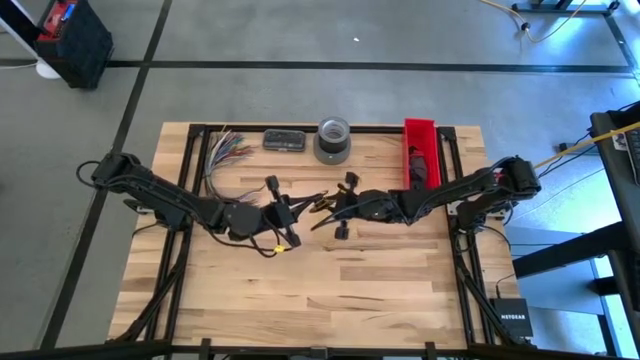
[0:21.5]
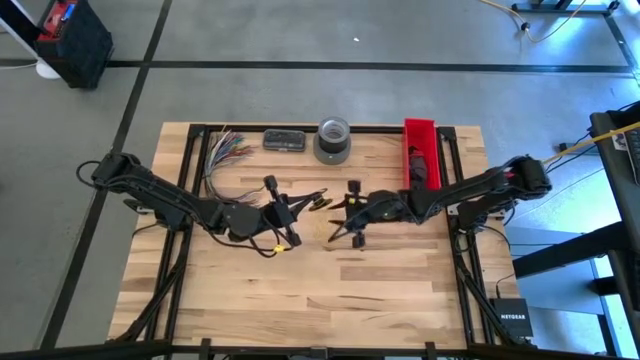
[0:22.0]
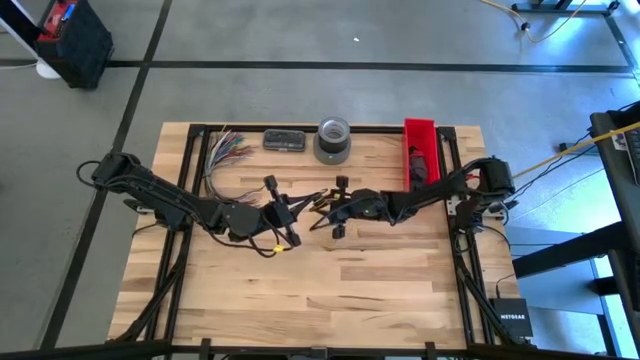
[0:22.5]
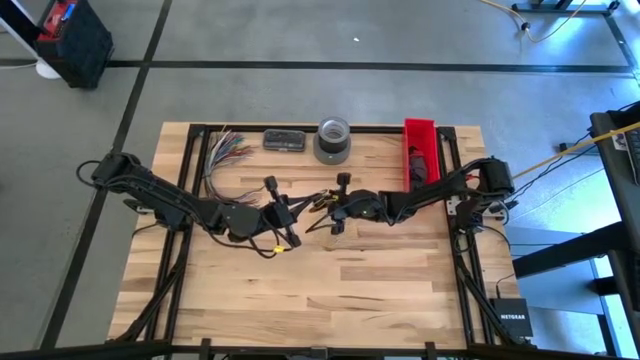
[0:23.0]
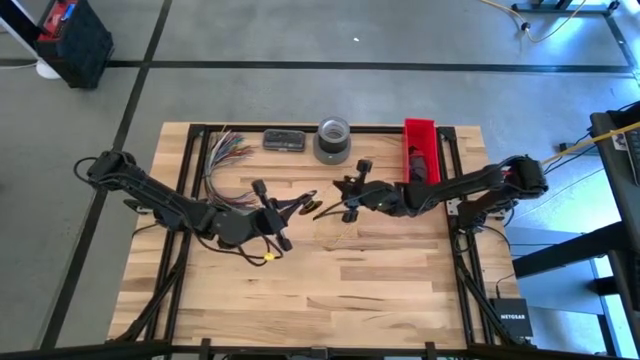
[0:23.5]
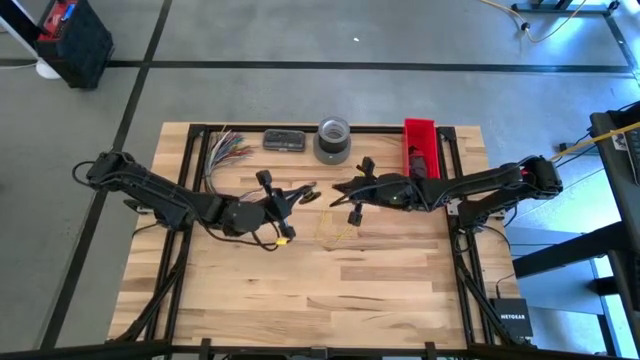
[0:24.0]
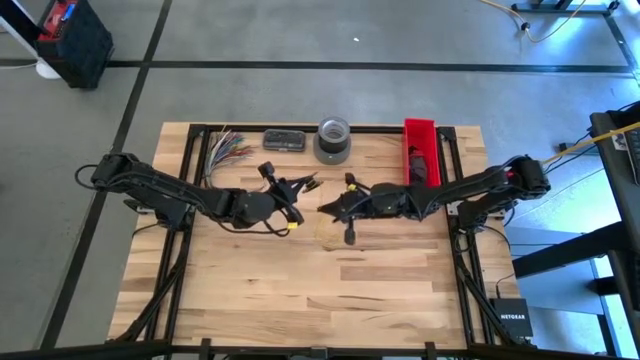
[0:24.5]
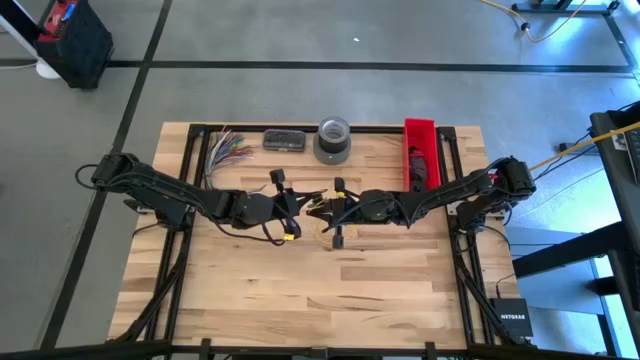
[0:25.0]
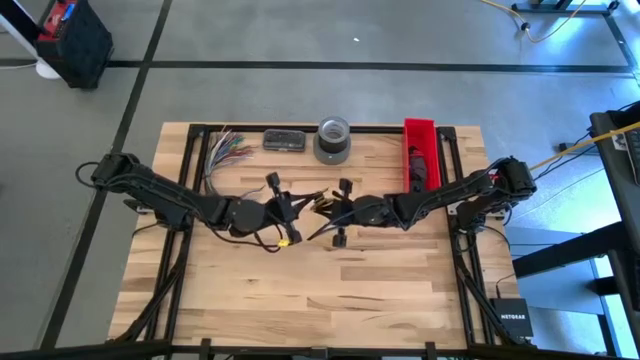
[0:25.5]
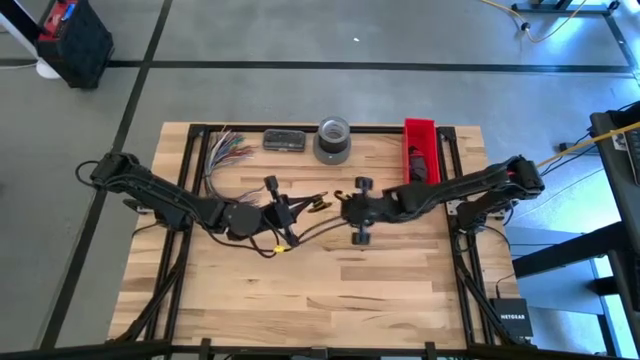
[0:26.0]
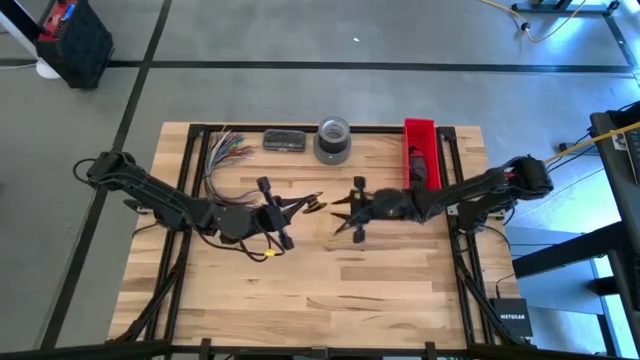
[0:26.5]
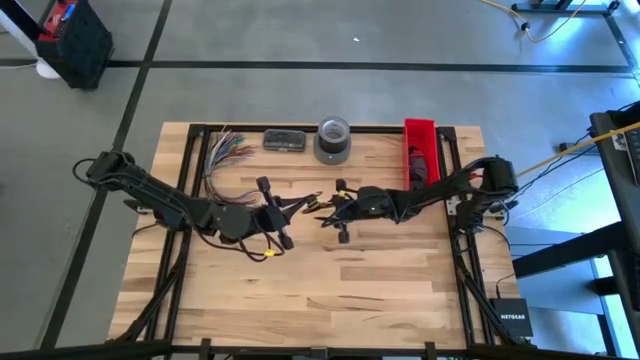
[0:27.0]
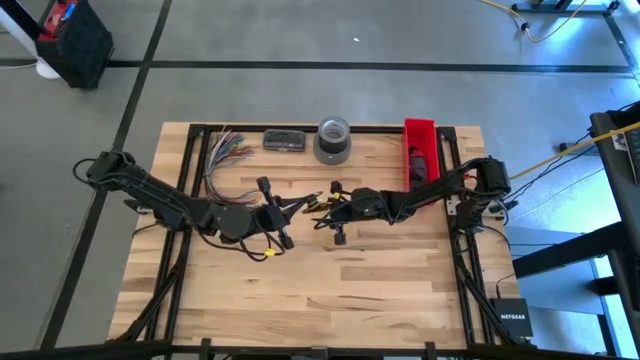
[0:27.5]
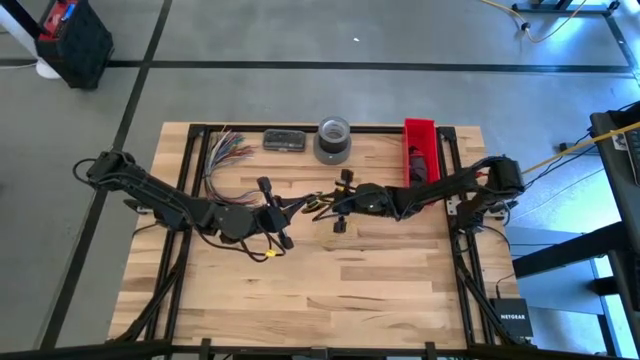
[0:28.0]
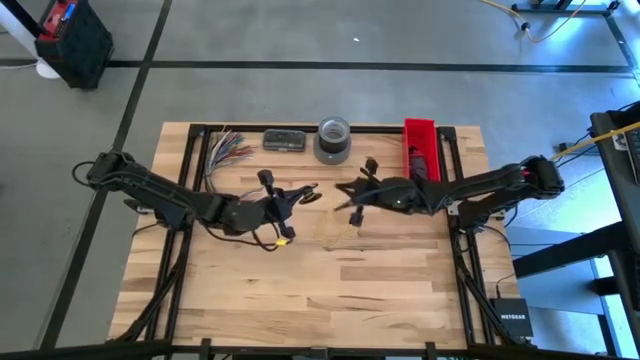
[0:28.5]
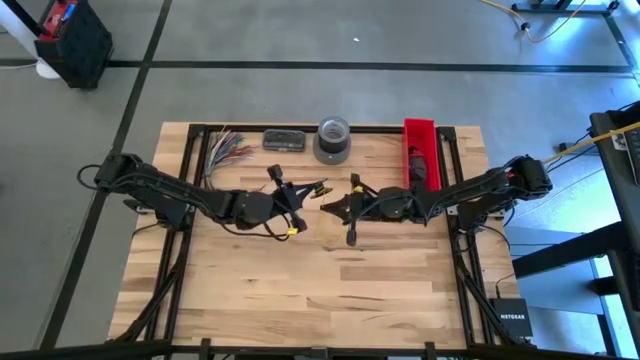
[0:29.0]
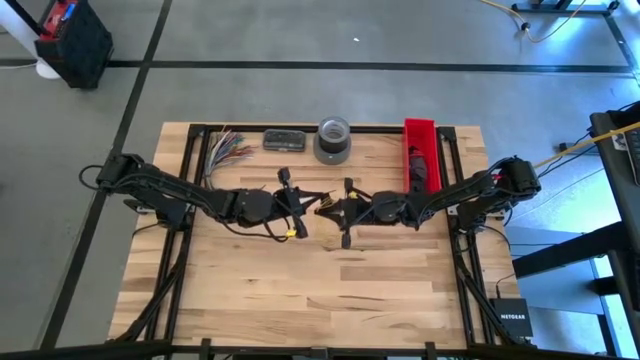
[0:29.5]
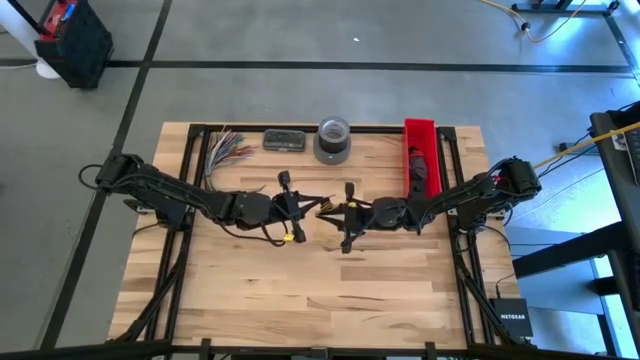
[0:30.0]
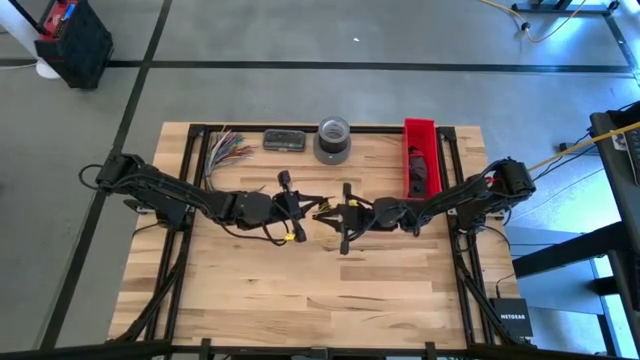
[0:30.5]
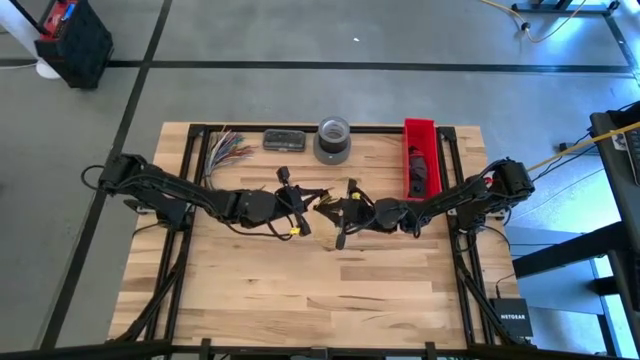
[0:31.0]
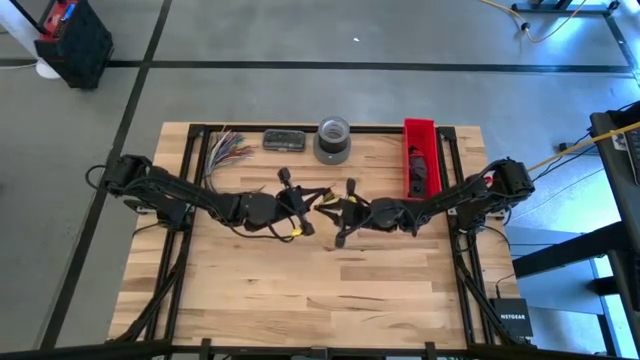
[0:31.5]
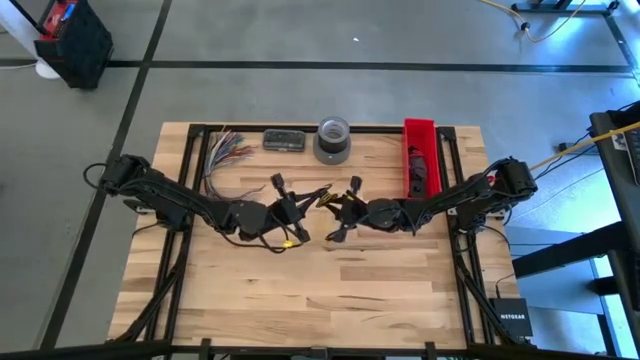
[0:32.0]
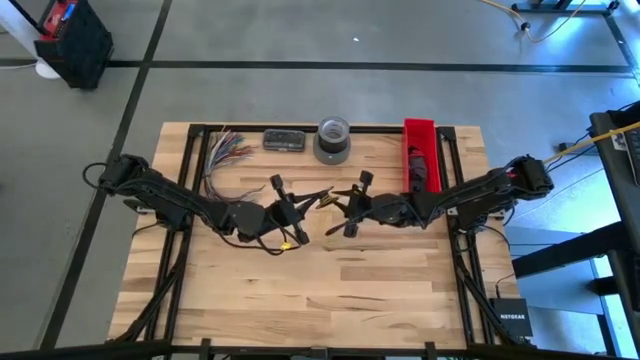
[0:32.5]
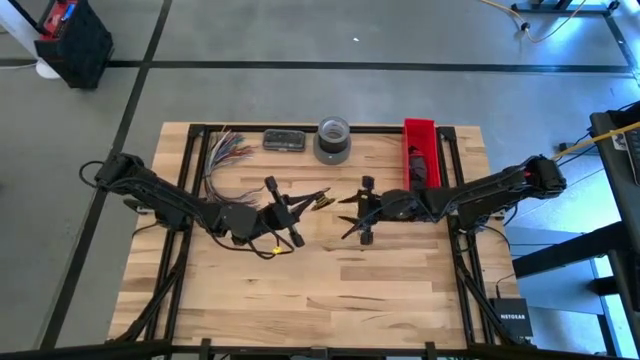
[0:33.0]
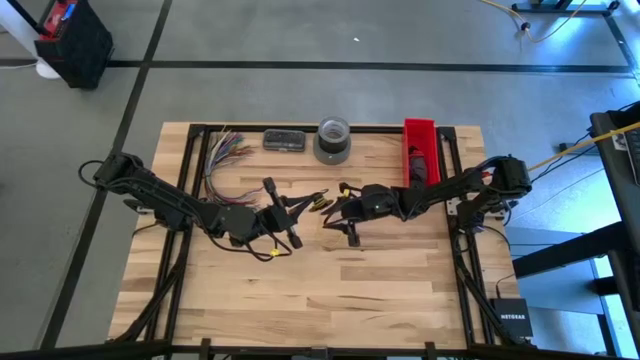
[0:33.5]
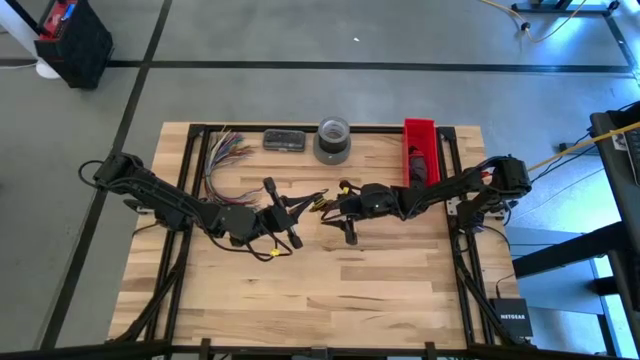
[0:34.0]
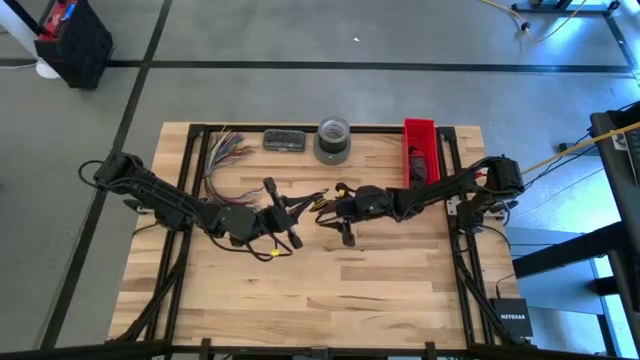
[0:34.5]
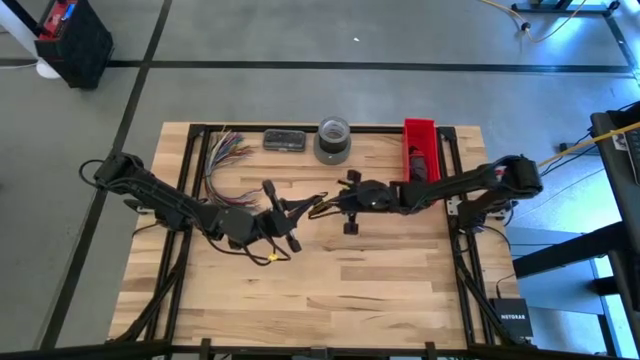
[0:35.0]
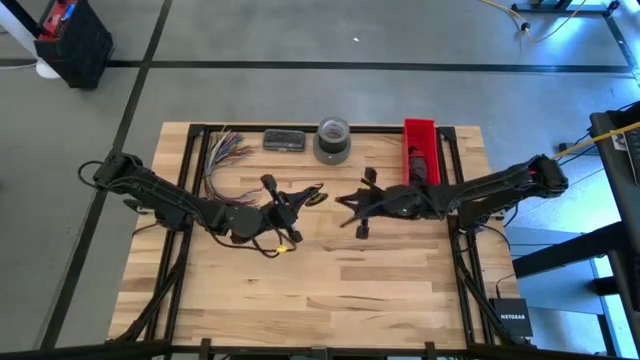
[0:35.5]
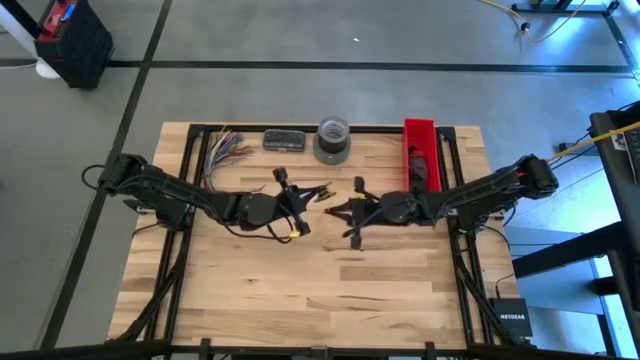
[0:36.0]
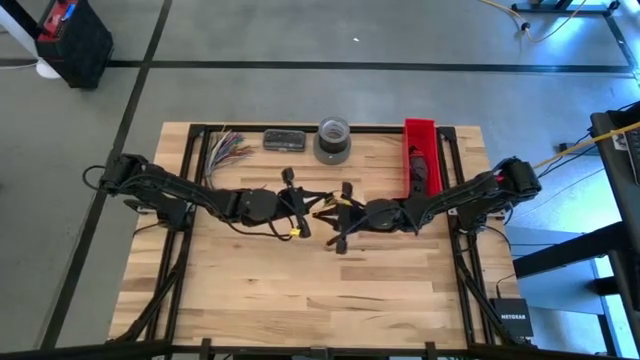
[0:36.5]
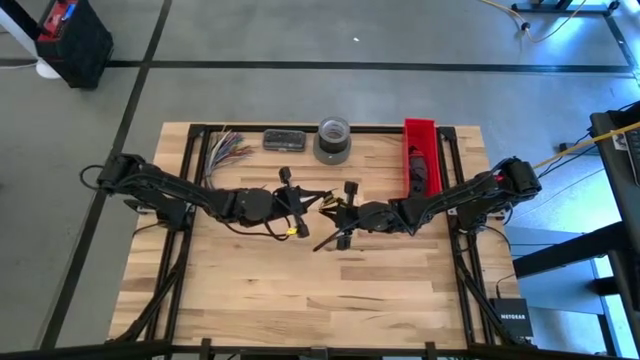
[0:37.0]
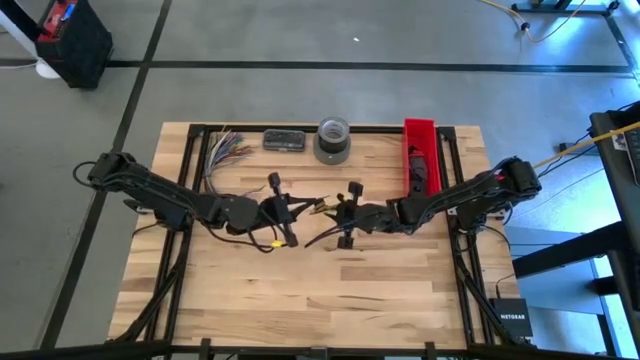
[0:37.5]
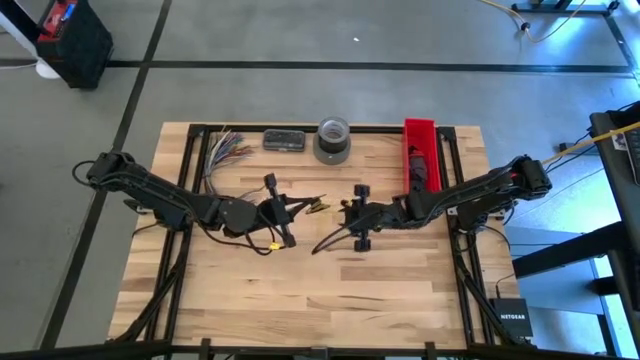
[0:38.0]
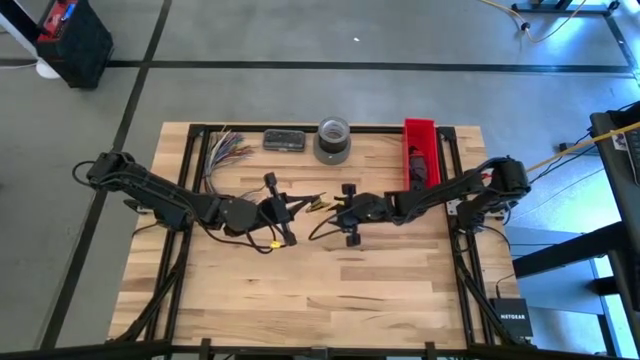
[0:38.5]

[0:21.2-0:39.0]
Task: Coil cords
Coil the yellow wire into the black spool

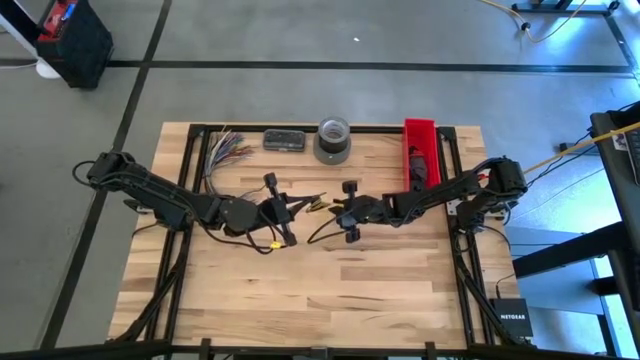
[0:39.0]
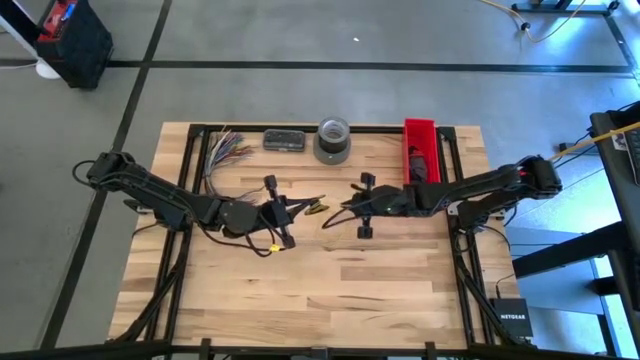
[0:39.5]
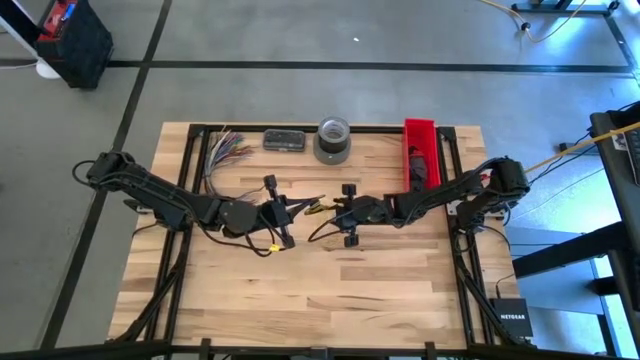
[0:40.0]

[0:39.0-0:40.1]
Coil the yellow wire into the black spool

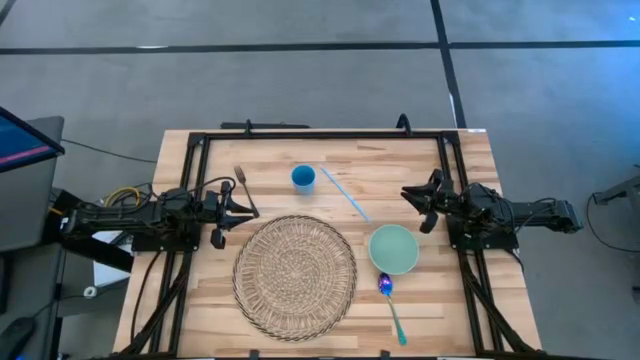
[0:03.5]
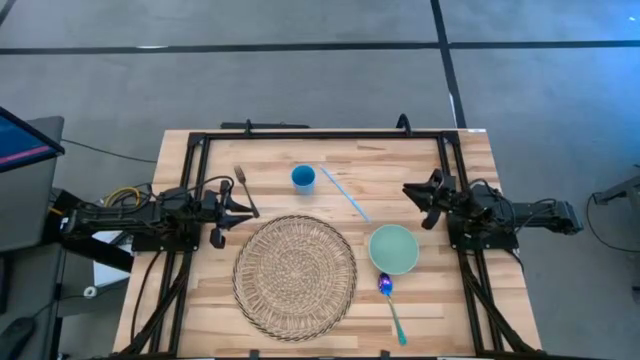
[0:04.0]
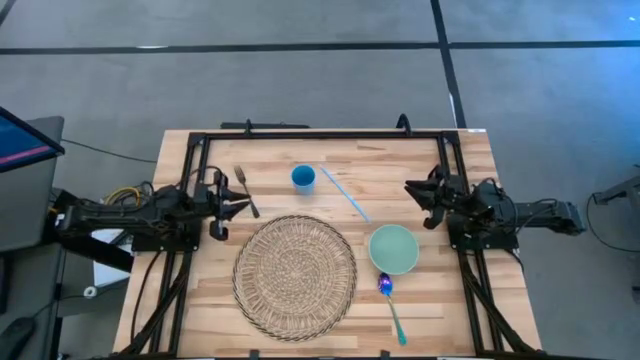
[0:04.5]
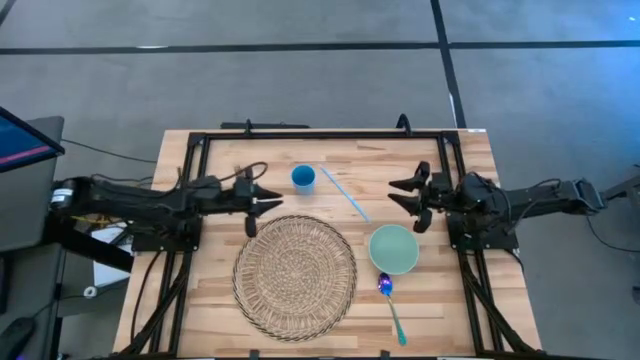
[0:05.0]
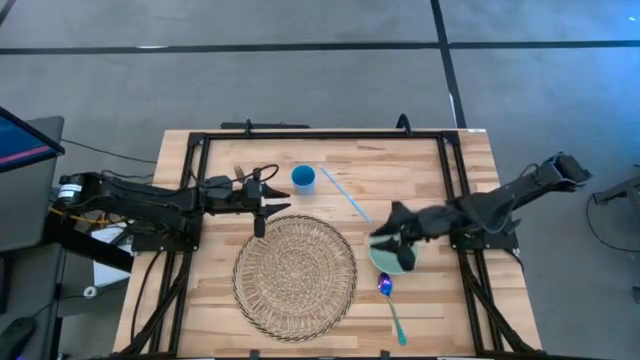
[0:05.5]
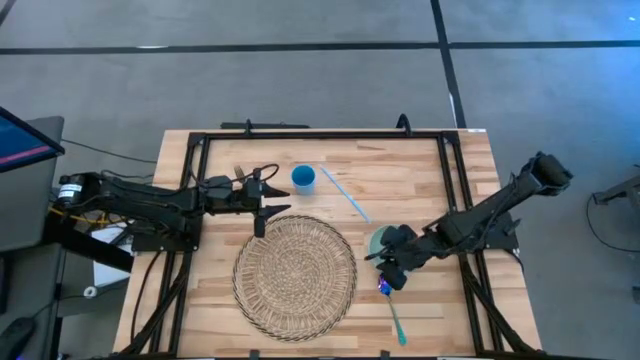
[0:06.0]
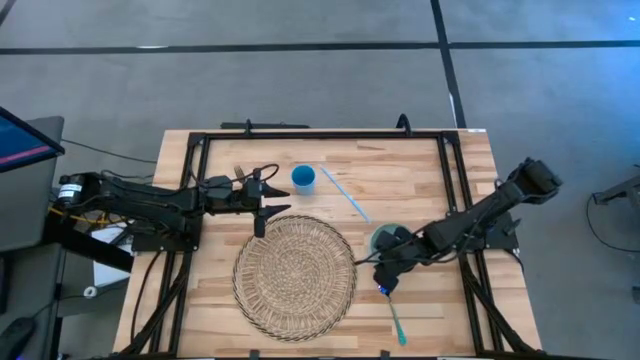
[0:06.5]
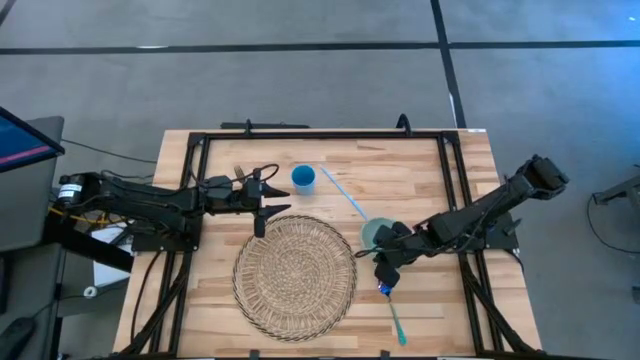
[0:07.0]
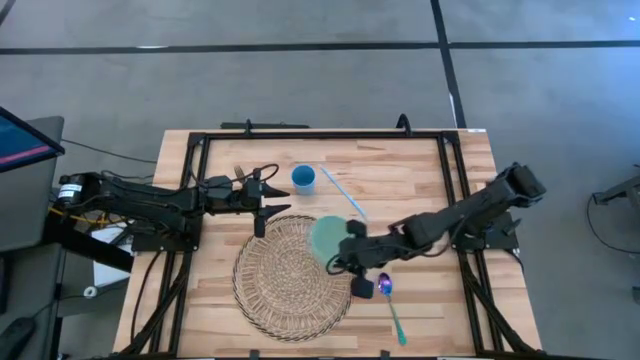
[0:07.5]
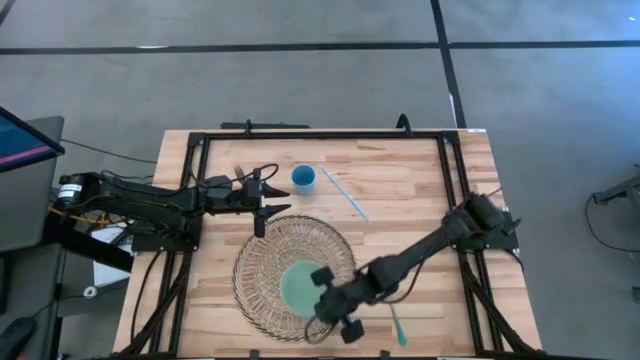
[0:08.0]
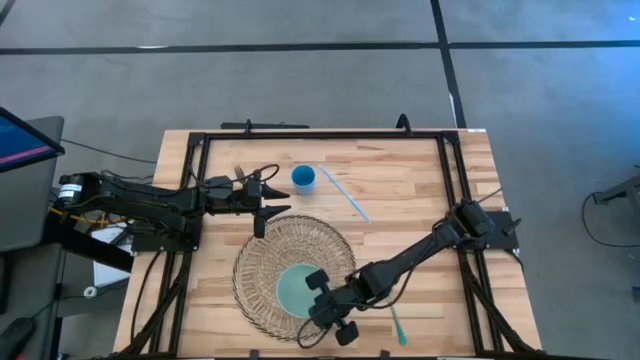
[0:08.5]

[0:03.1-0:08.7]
Task: Pick & Place Utensil
Put the green bowl on the bottom of the woven placemat
